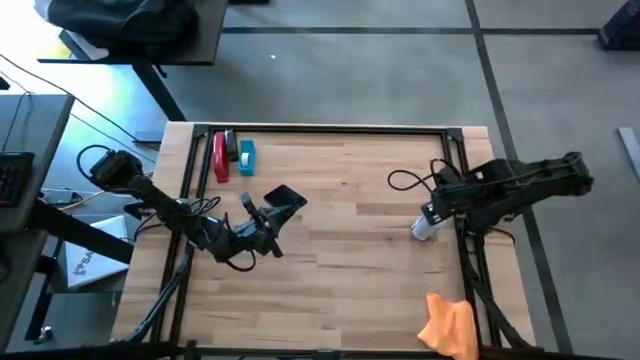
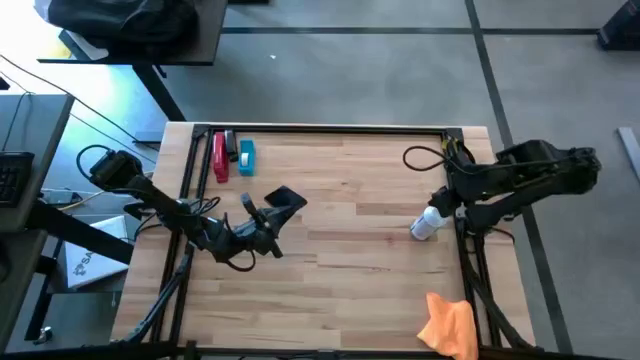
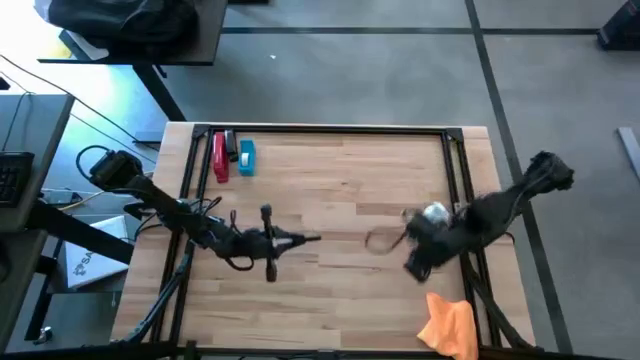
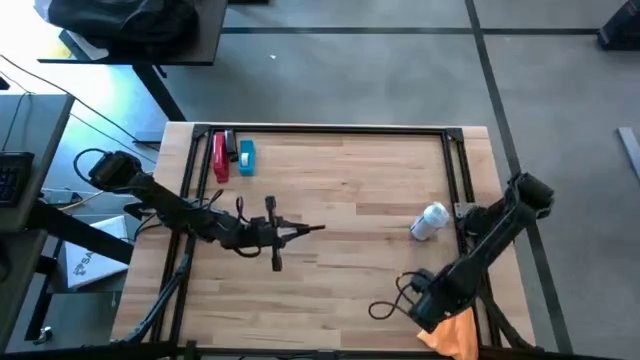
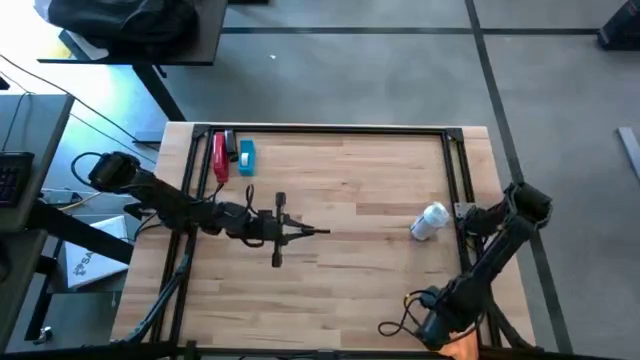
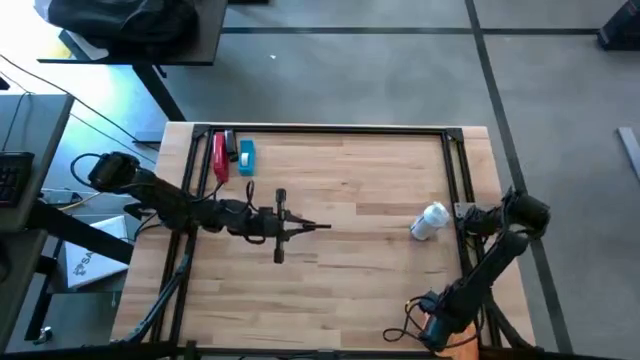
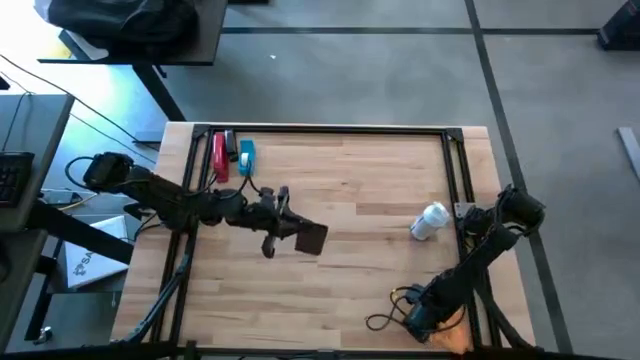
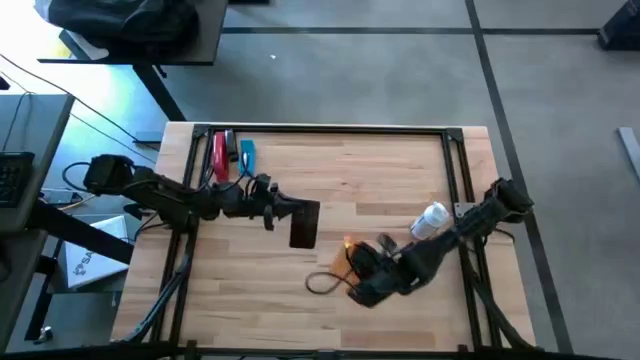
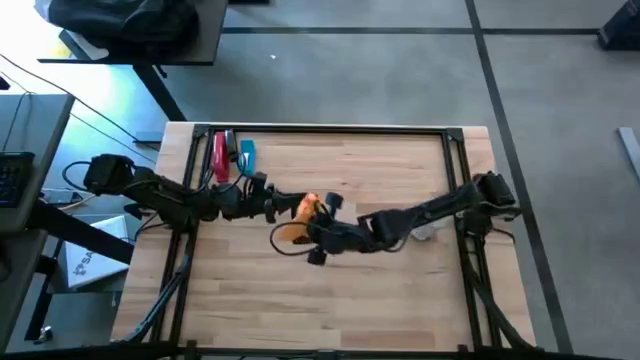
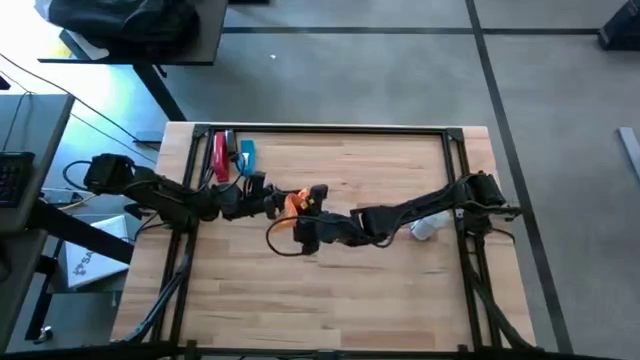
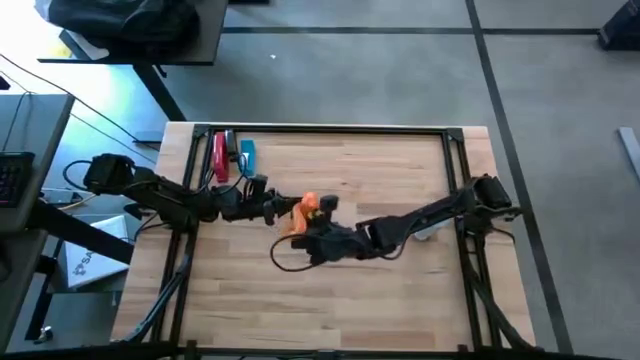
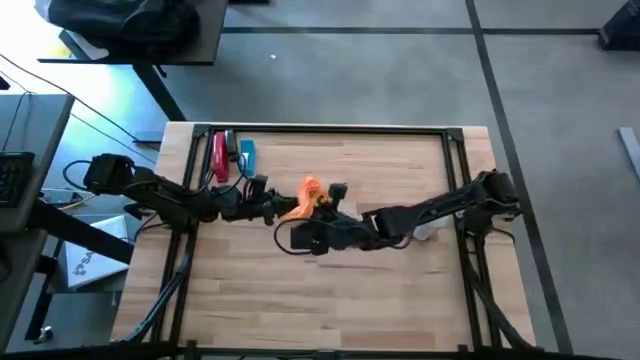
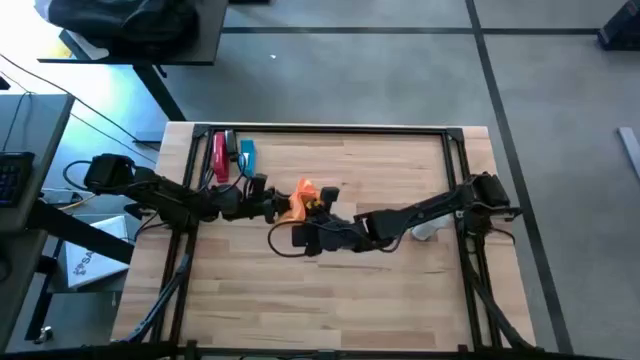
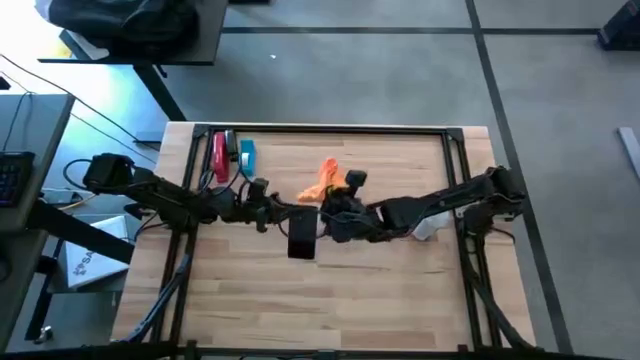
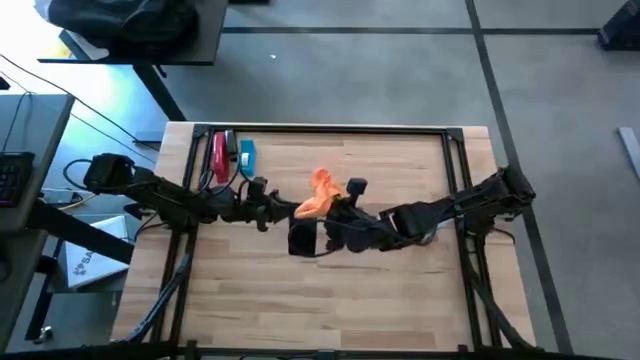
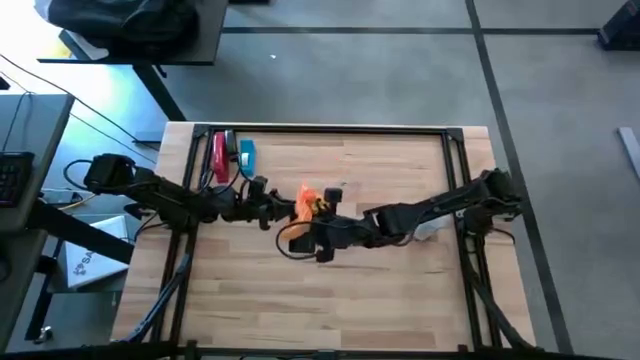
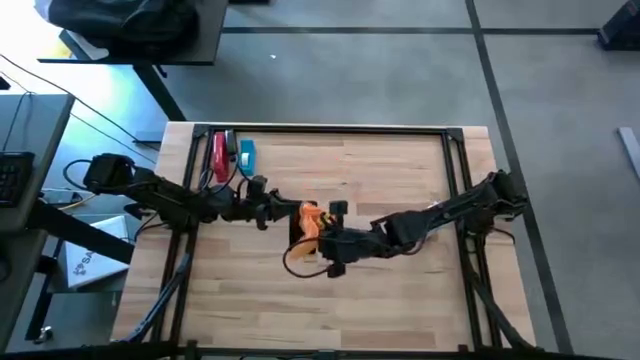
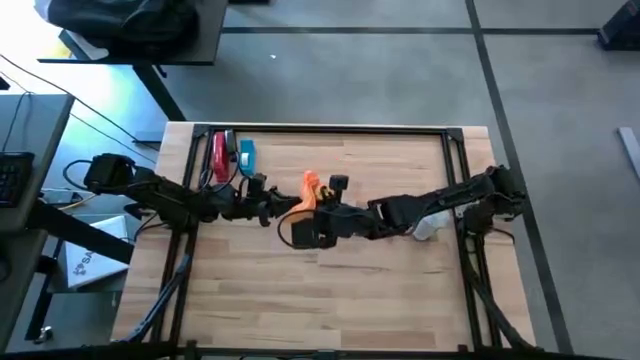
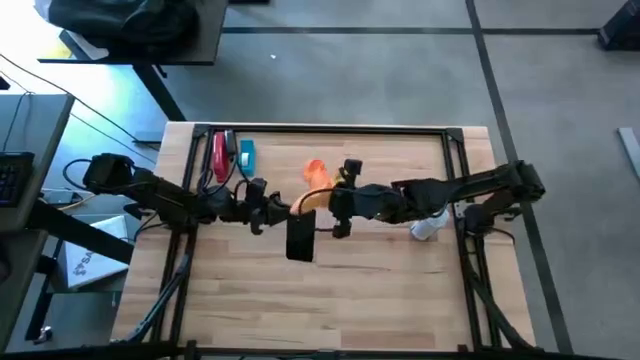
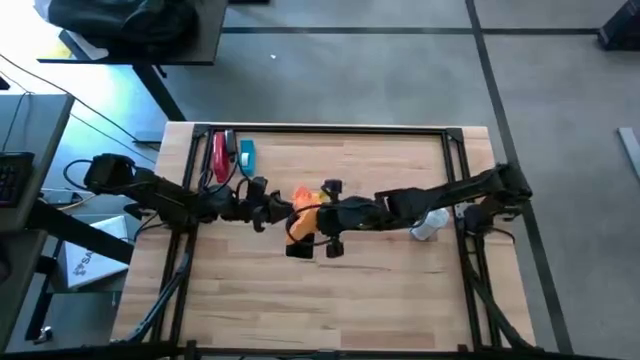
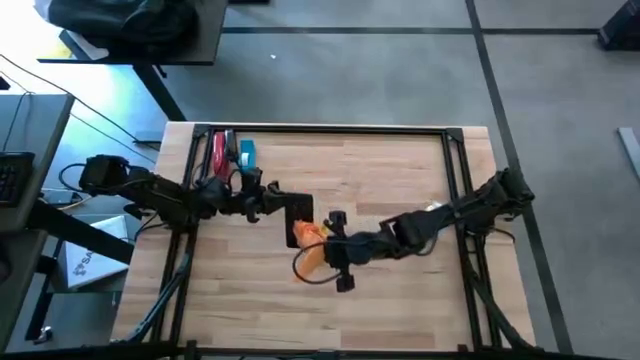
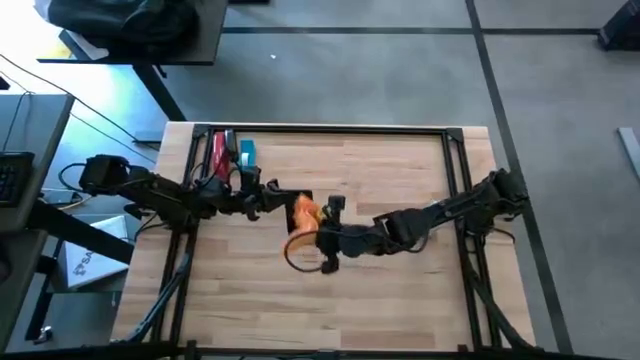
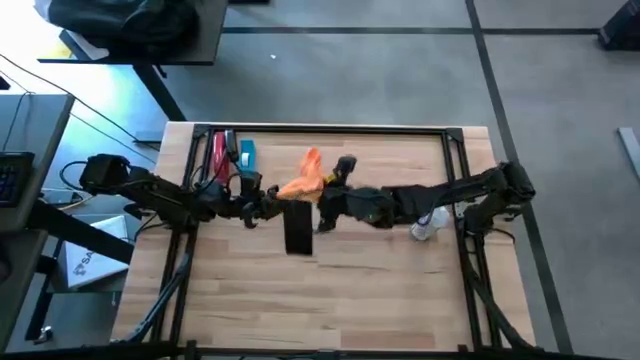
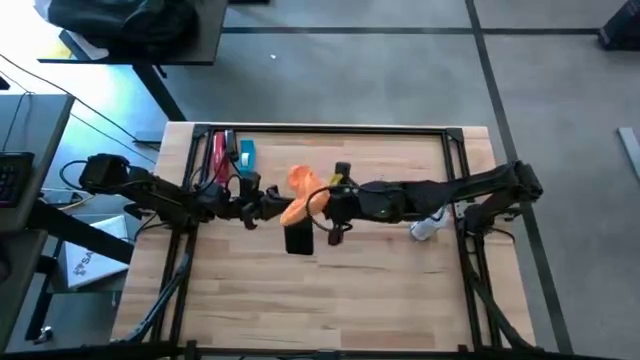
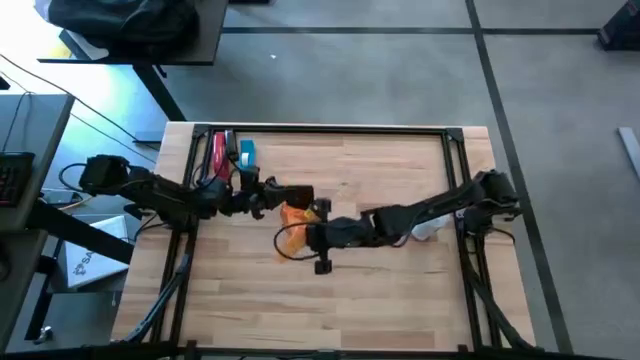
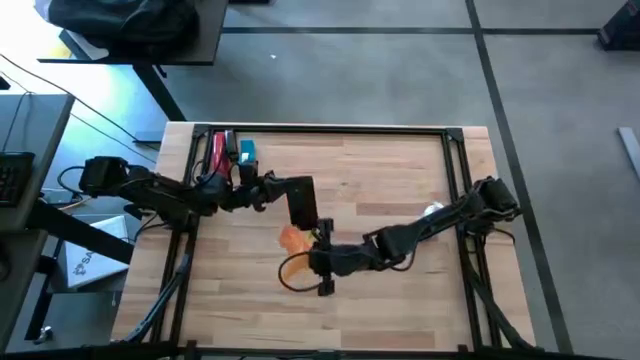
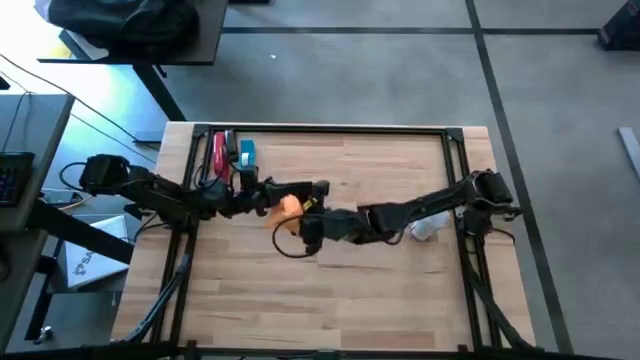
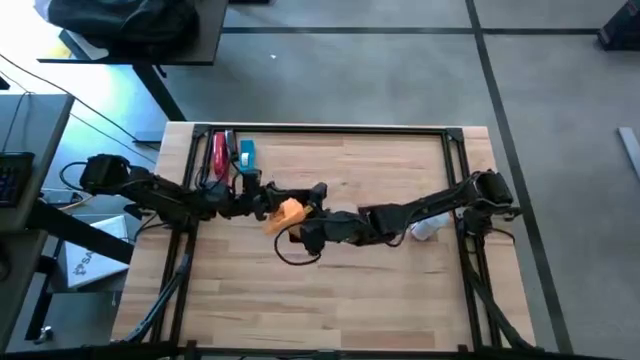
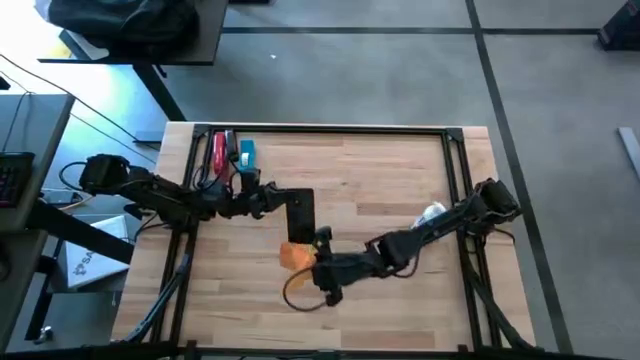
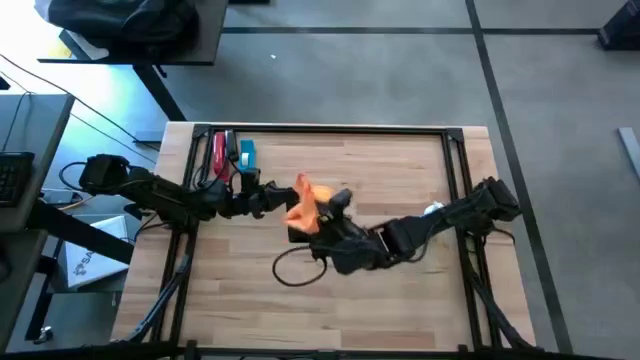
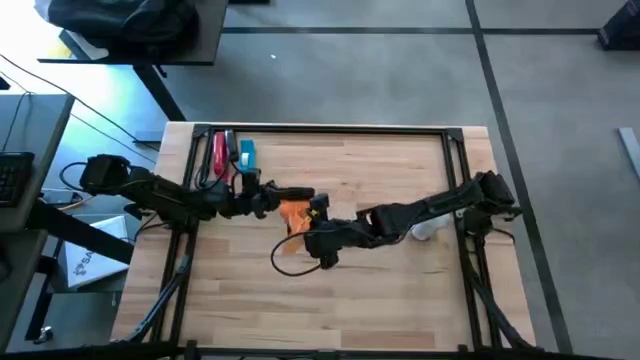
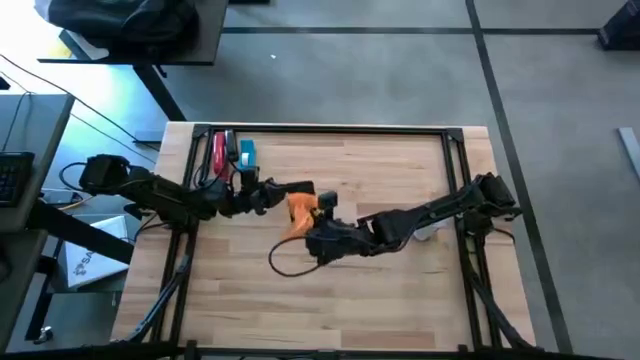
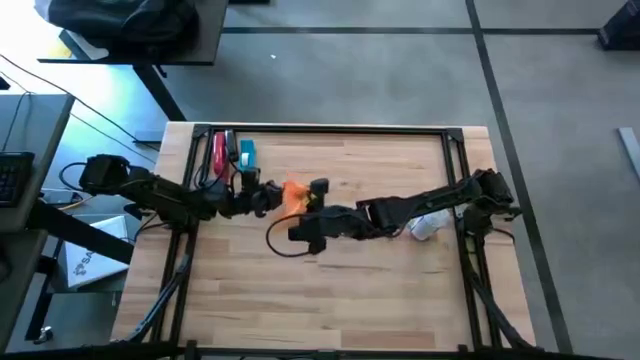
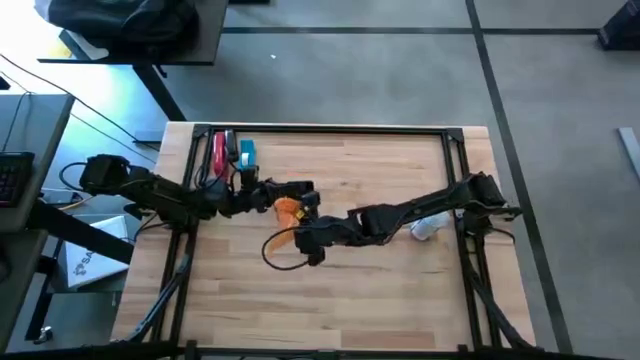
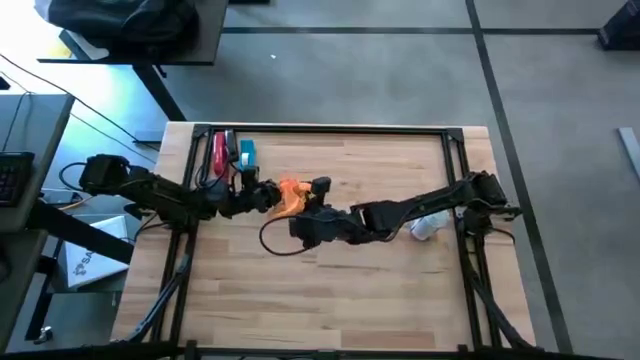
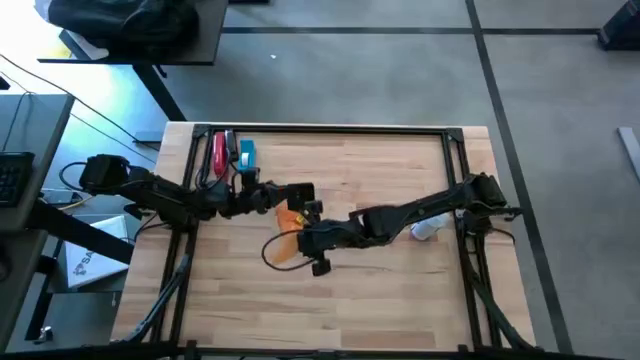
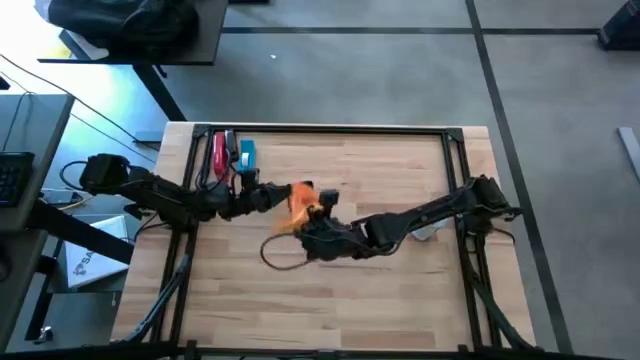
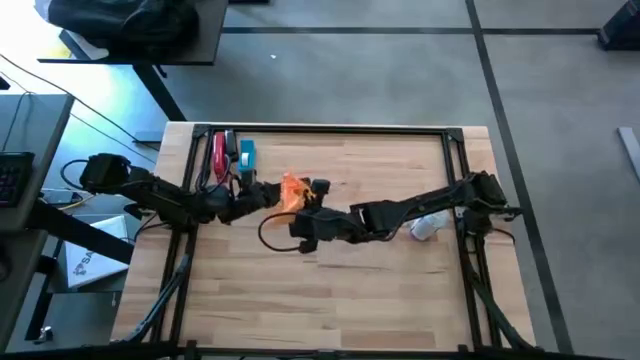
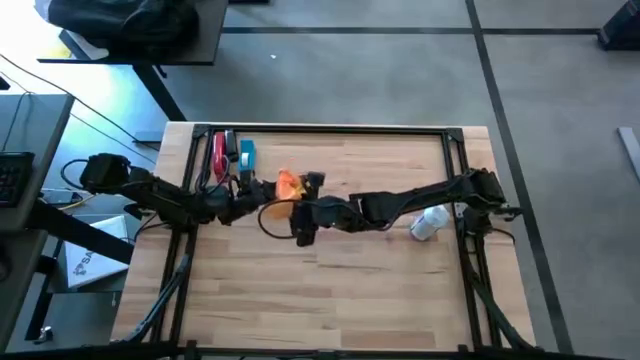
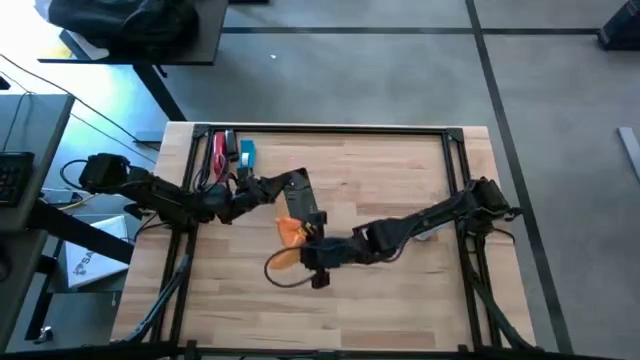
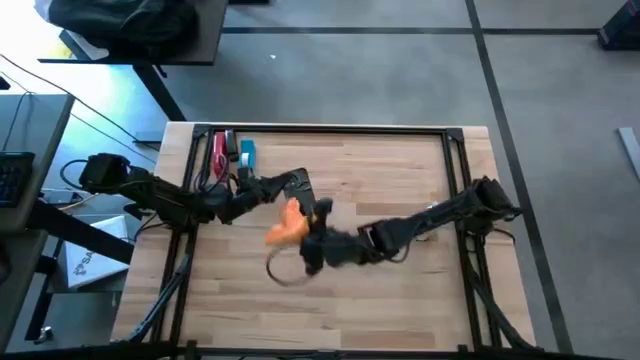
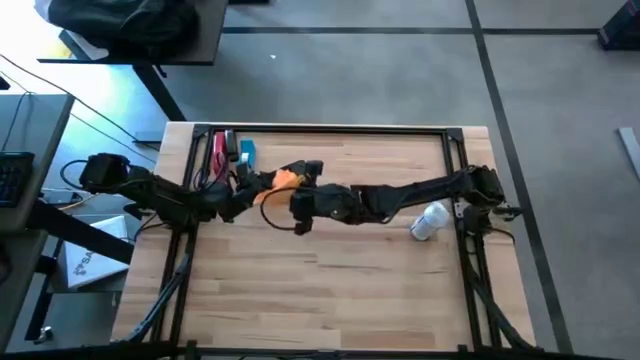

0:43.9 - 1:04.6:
Task: Apply microfiber cloth
Wipe the front and back of the black cellphone using the yellow microfiber cloth
